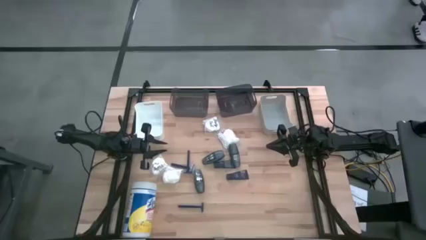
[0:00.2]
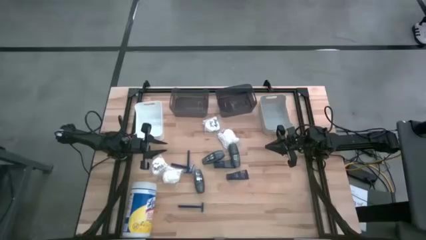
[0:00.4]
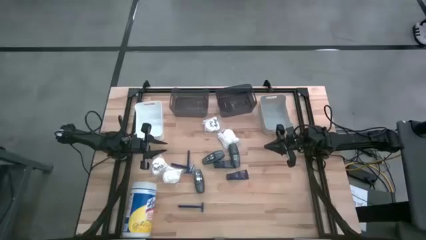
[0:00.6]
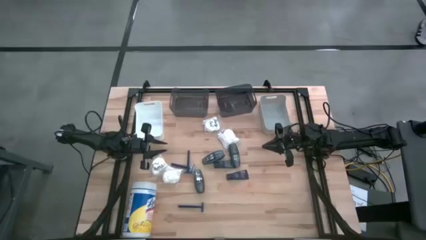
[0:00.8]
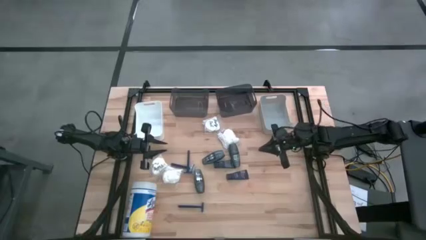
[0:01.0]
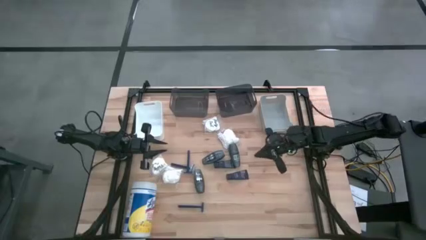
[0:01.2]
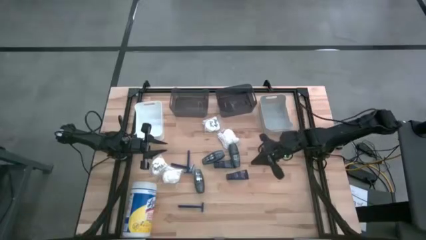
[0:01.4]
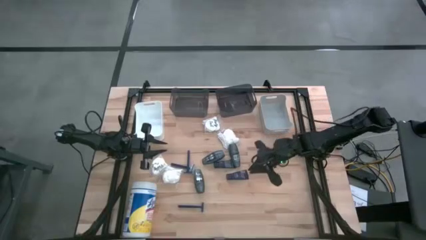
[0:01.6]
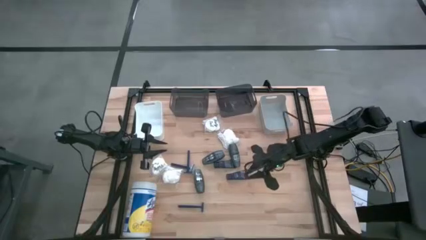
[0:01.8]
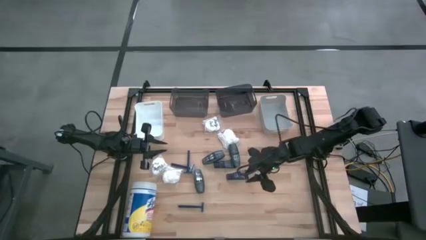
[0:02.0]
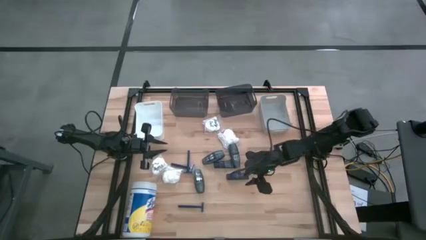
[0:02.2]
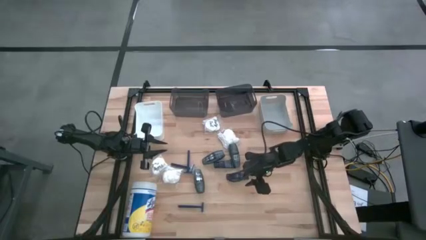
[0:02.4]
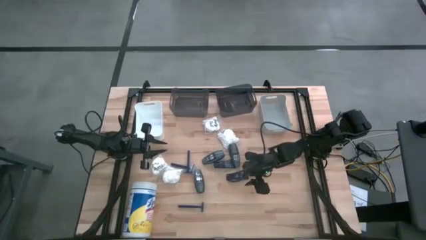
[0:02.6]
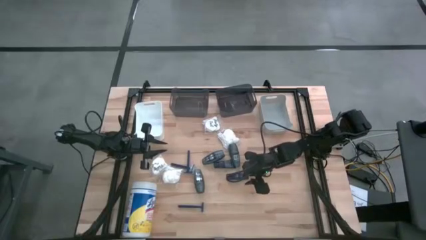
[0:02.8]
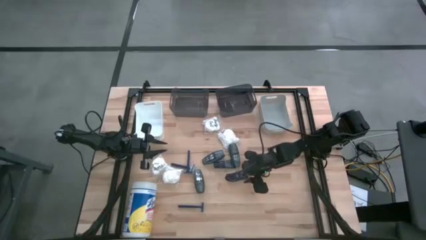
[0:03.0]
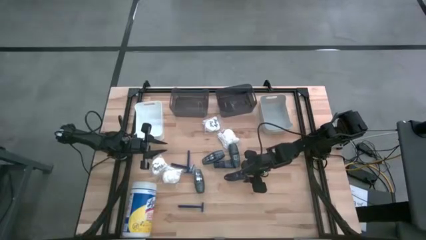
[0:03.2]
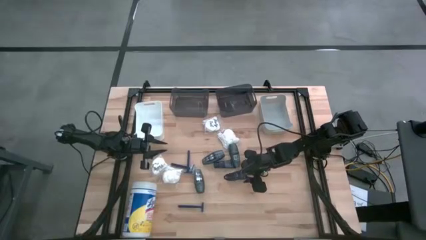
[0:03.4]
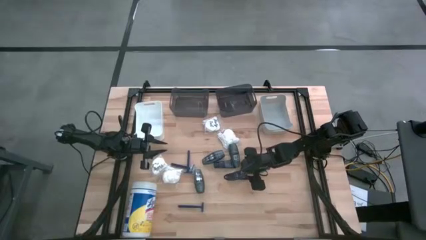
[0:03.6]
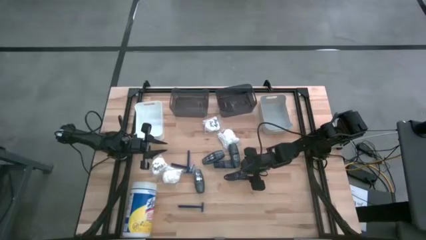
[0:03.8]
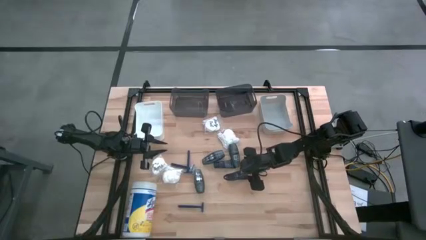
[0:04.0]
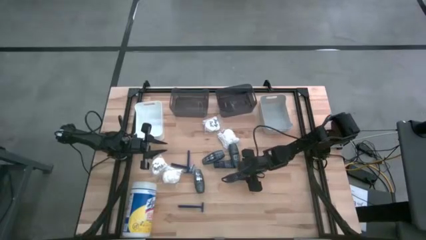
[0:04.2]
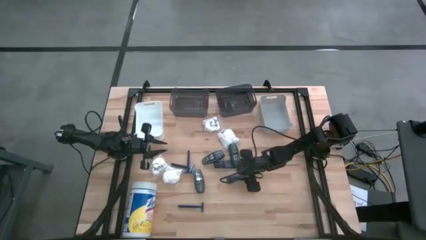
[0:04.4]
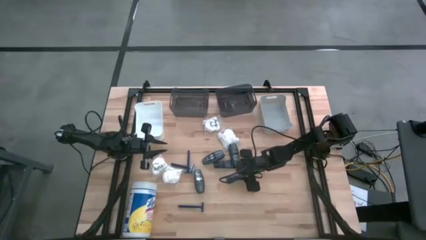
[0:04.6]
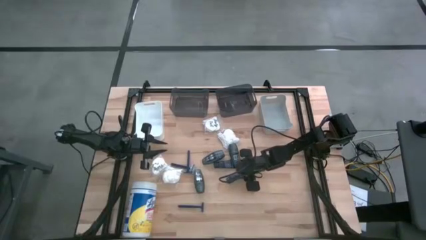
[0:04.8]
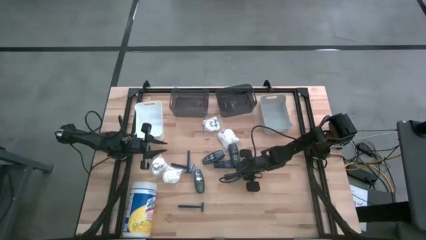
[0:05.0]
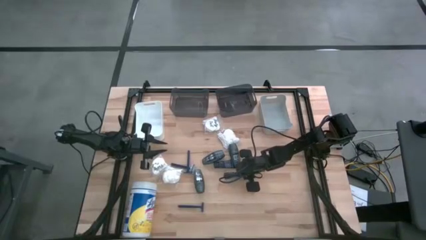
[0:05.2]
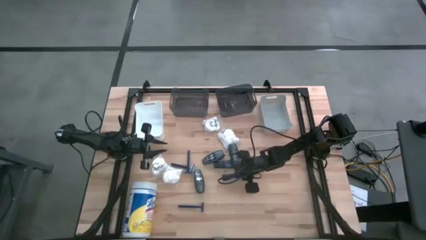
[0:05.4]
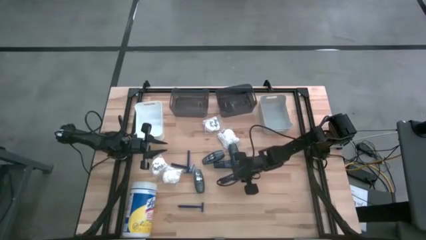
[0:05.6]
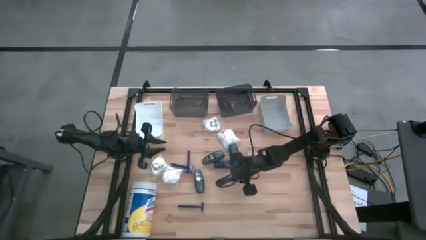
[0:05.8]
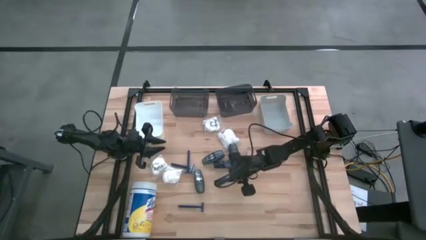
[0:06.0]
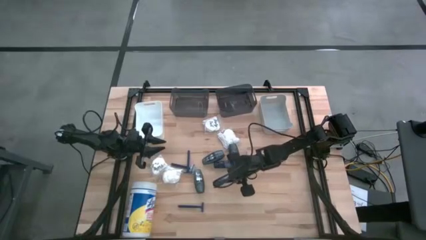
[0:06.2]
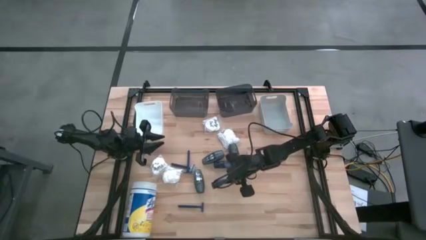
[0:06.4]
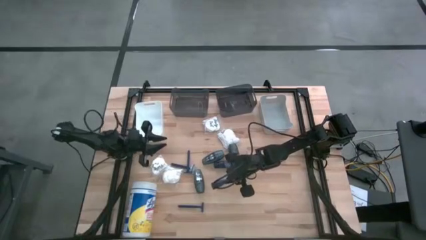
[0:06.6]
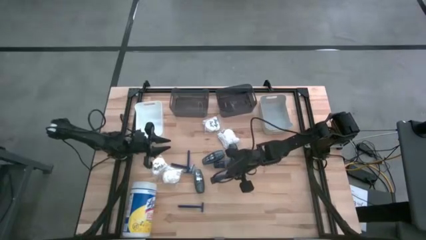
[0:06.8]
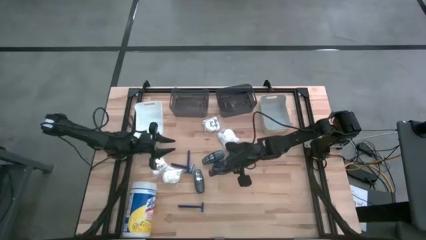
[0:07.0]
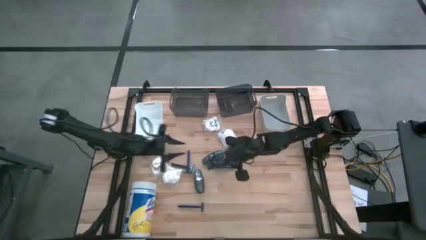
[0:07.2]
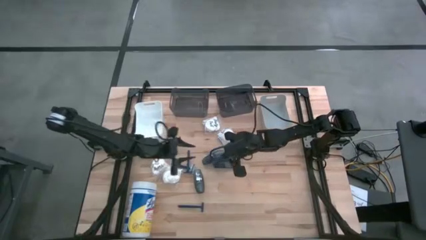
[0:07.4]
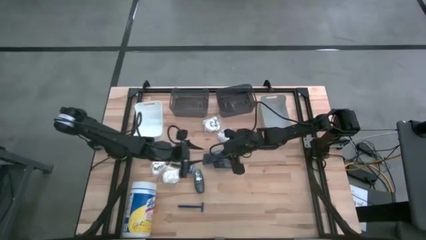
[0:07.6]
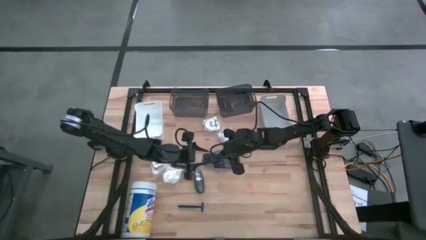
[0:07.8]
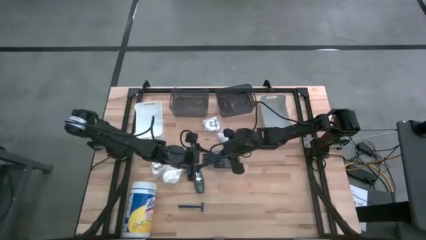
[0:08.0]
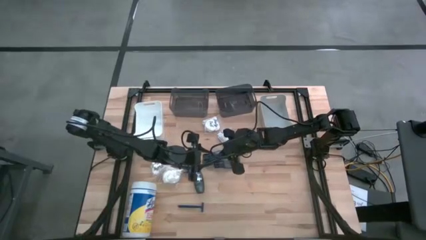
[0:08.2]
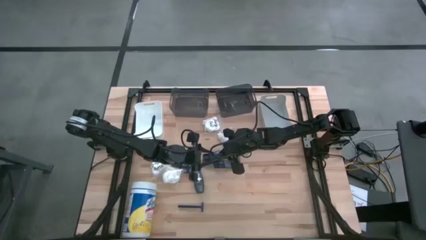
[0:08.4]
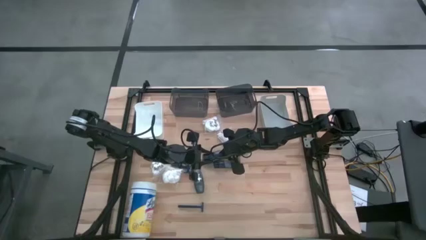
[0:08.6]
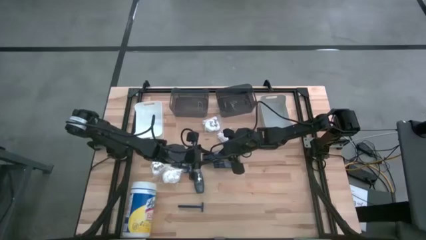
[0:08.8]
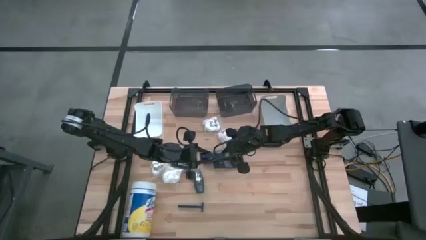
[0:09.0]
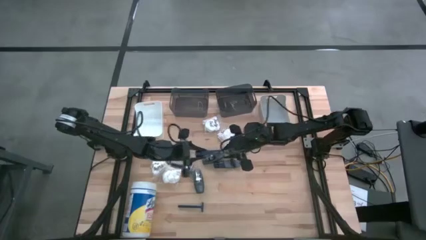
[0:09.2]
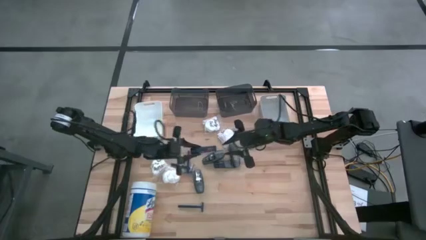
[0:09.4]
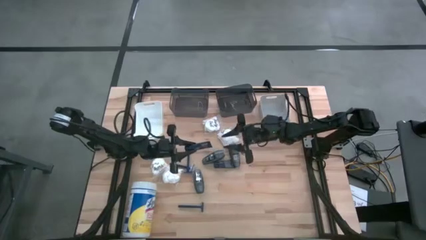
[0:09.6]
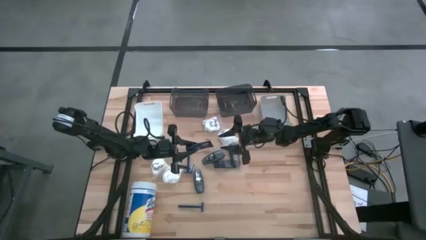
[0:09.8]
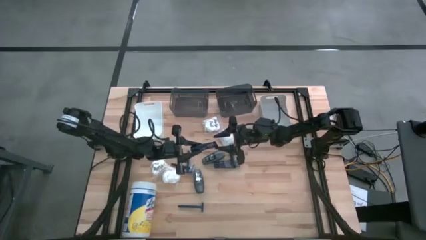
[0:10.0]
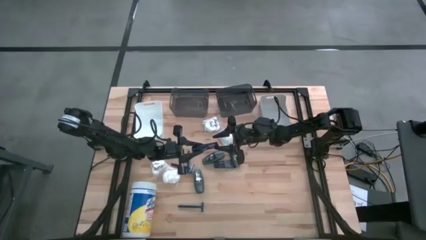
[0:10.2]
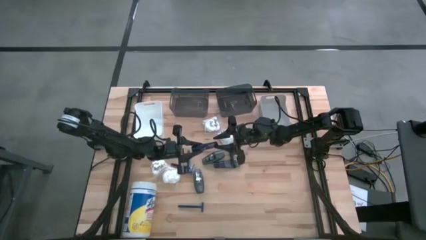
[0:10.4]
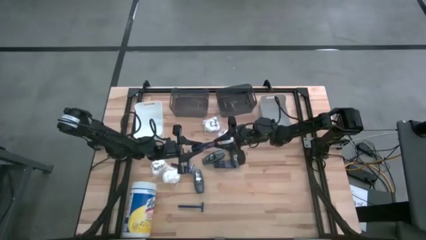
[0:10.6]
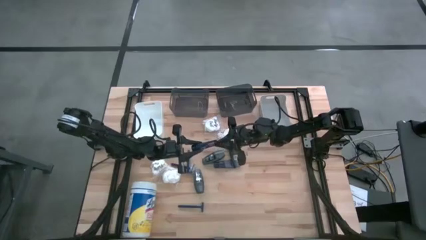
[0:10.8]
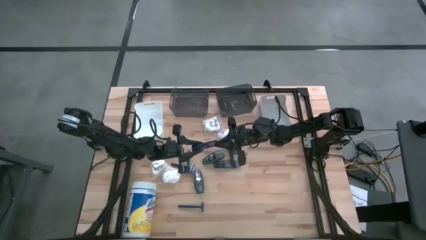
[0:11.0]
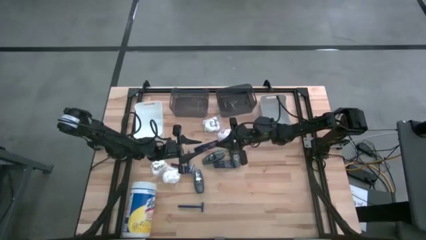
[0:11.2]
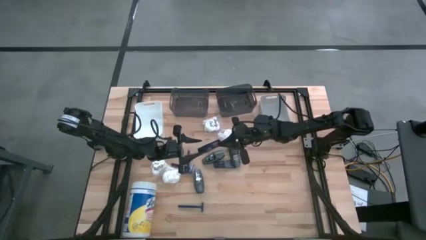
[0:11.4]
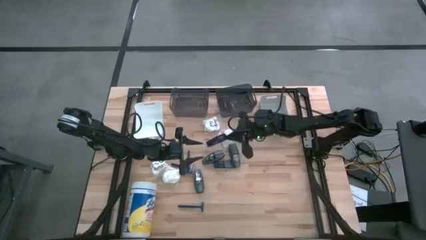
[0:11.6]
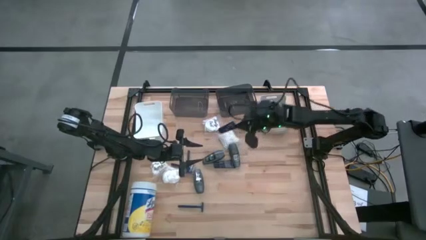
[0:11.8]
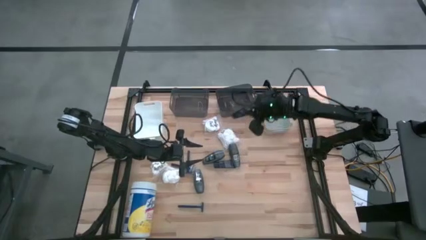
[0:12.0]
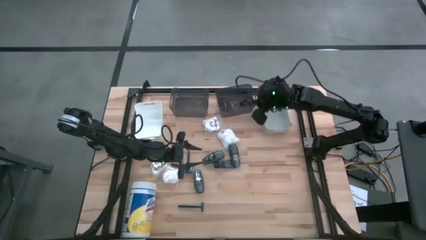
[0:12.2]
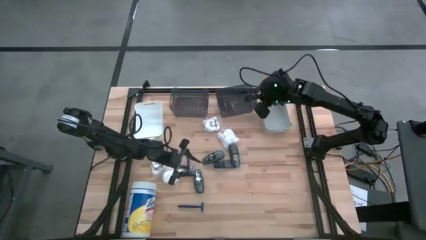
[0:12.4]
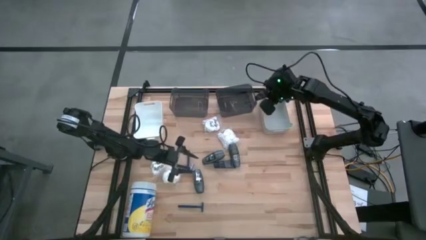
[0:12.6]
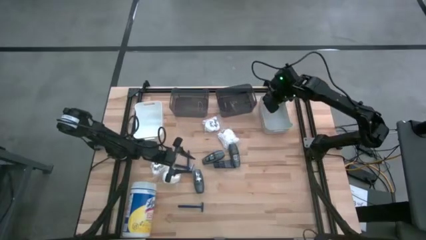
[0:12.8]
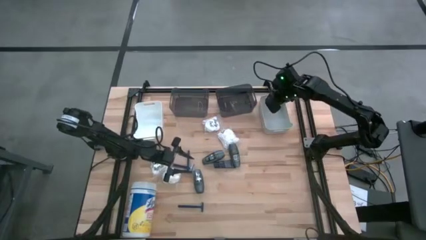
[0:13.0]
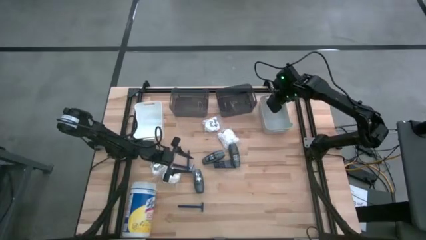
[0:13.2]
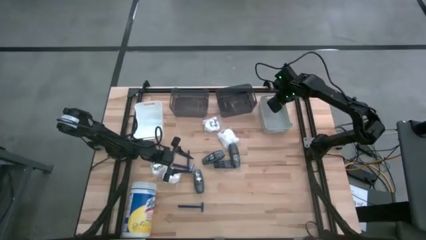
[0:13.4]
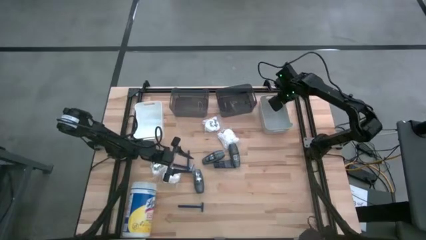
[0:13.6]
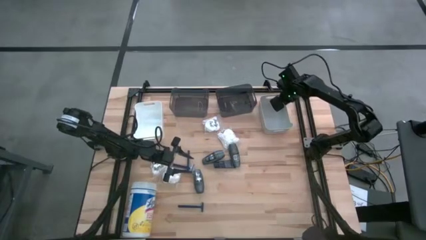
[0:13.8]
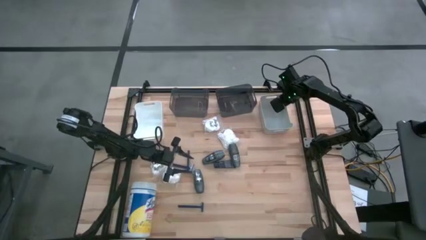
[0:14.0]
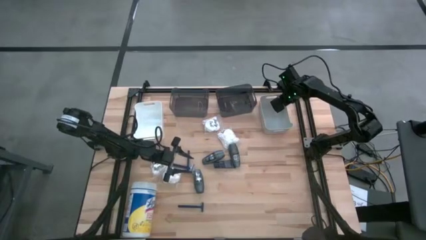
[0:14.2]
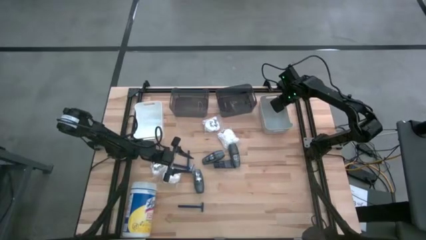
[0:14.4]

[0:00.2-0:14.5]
Task: Pick & Place Travel size toiletries
Put the blue shave cream into the gray bin

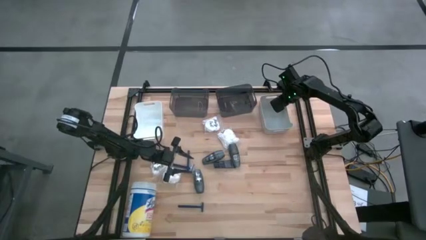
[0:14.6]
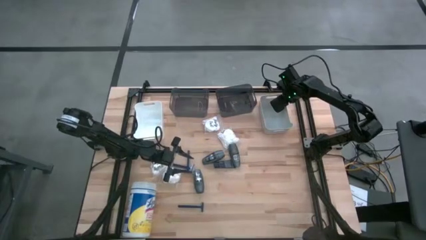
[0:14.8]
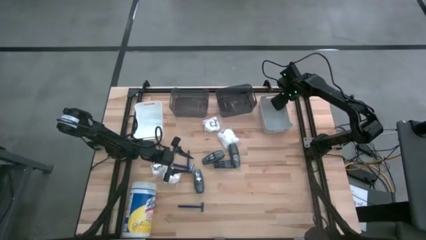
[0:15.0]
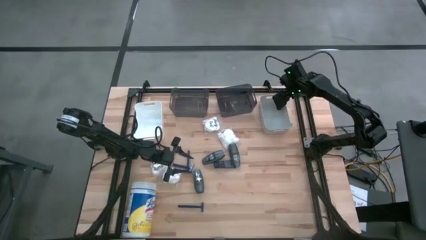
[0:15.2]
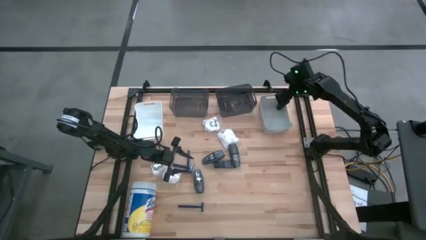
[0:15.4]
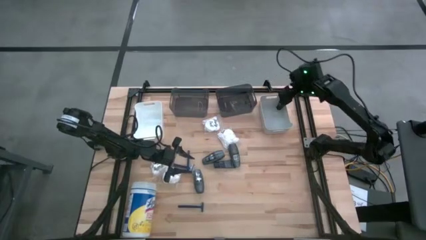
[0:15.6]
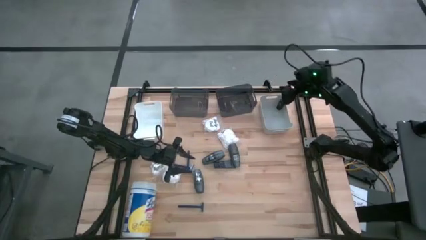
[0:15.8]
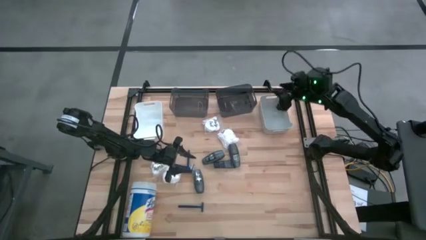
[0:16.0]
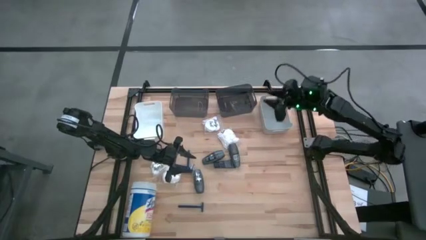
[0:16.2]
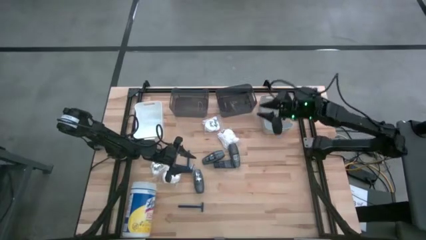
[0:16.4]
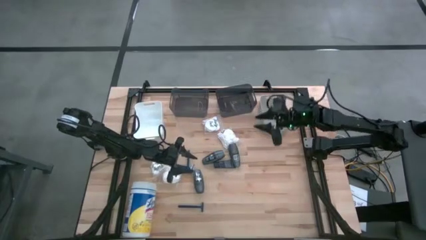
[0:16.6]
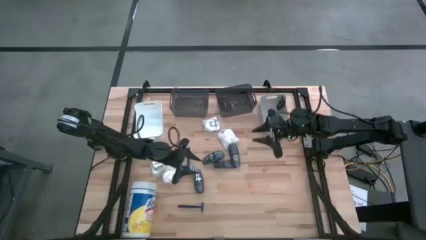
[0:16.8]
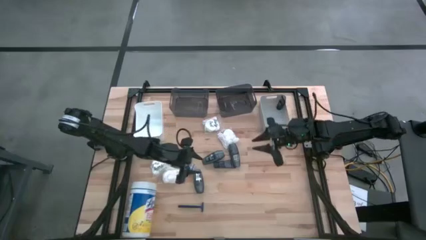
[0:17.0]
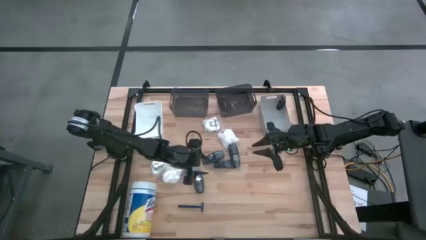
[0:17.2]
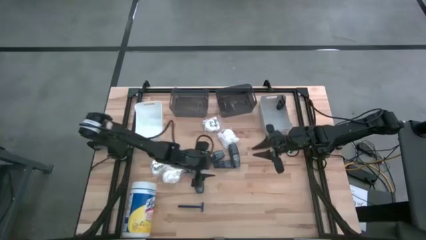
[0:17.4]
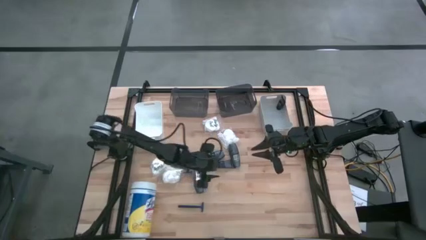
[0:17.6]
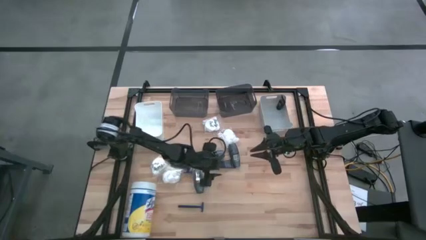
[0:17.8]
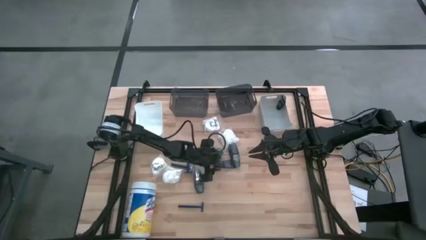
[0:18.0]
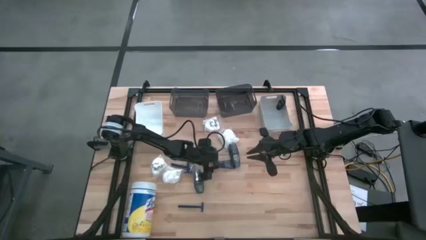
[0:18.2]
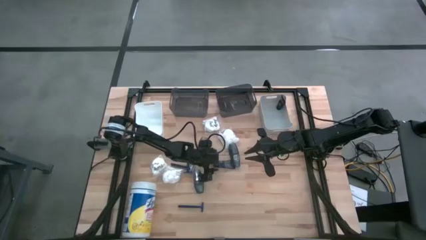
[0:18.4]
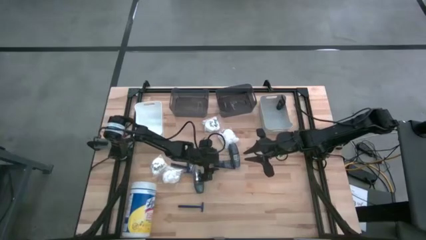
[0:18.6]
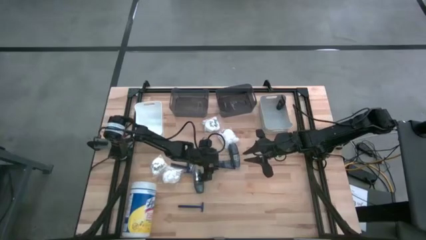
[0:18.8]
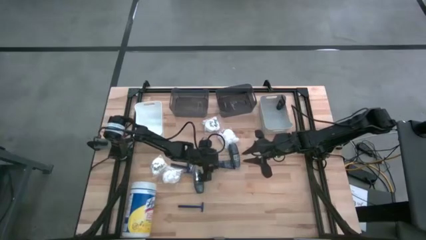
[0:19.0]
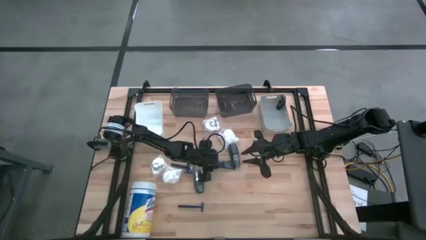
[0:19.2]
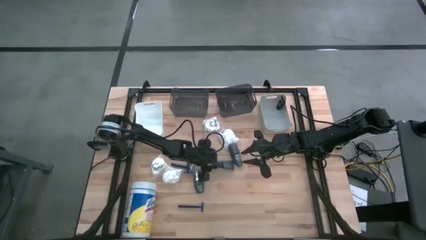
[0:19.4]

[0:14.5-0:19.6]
Put the blue shave cream into the gray bin
